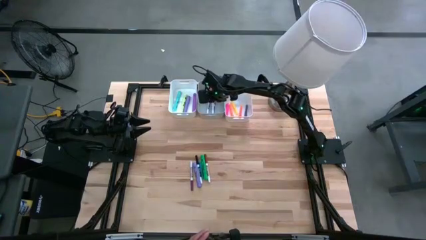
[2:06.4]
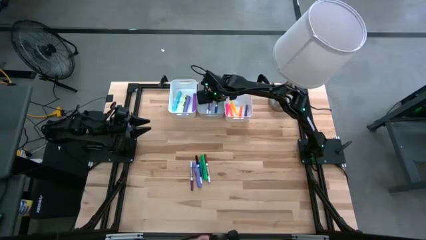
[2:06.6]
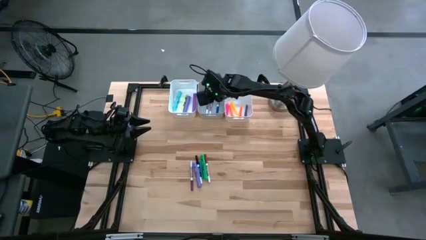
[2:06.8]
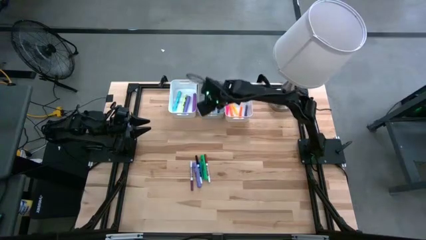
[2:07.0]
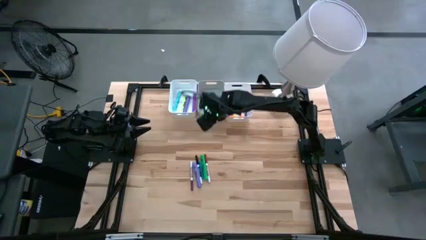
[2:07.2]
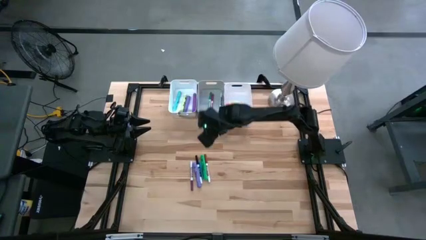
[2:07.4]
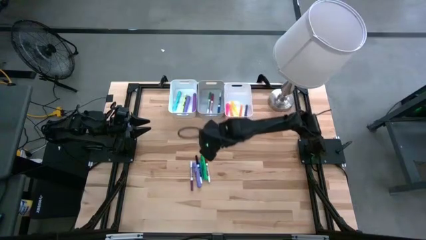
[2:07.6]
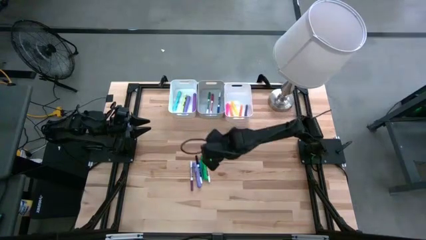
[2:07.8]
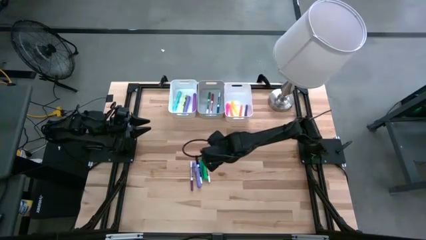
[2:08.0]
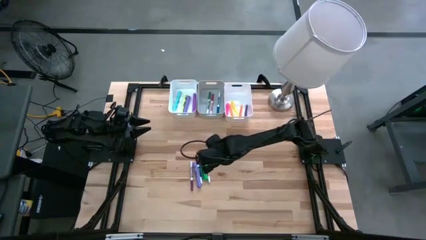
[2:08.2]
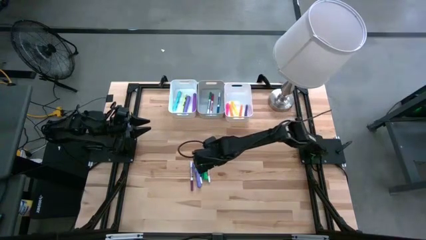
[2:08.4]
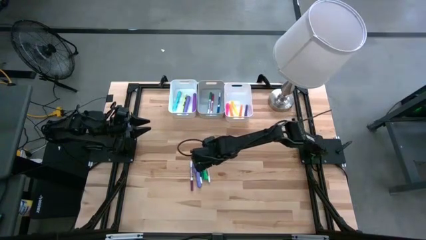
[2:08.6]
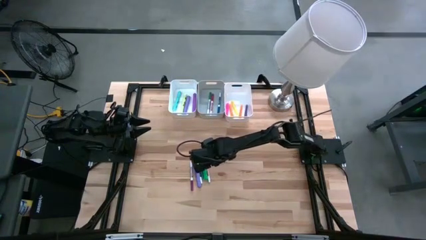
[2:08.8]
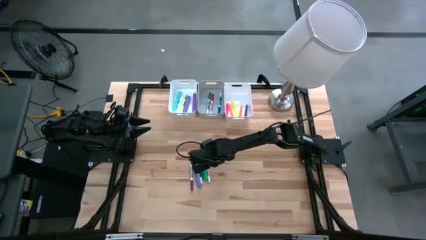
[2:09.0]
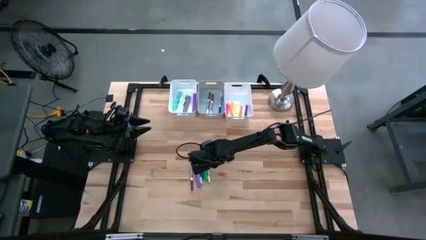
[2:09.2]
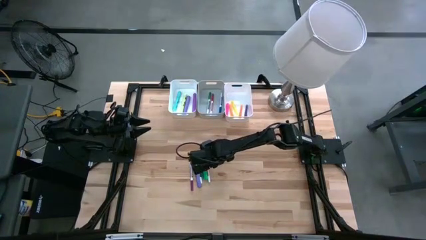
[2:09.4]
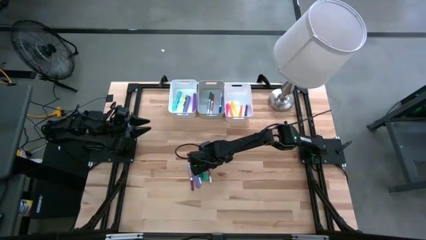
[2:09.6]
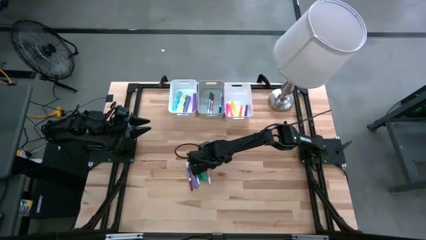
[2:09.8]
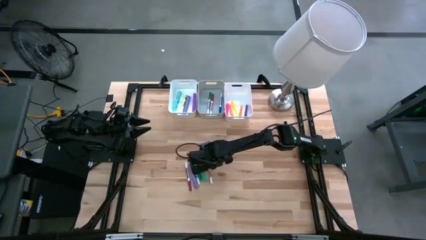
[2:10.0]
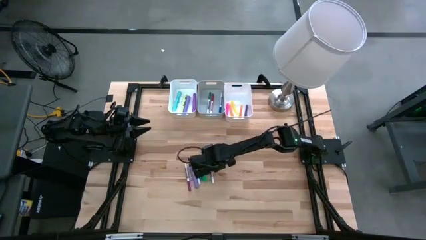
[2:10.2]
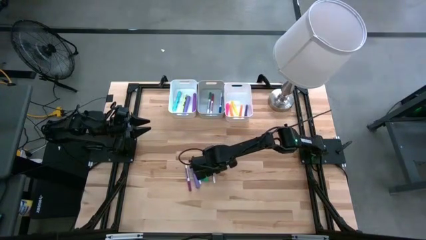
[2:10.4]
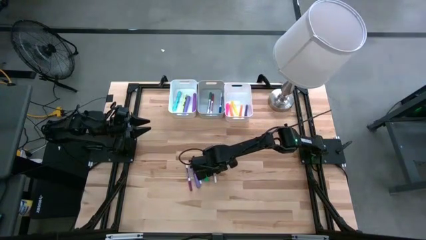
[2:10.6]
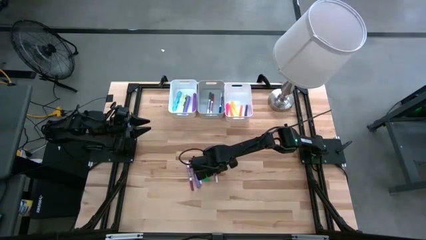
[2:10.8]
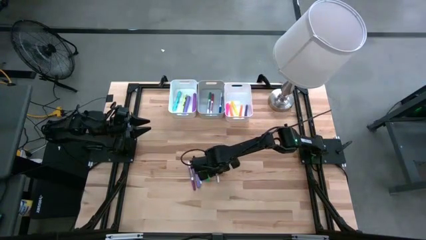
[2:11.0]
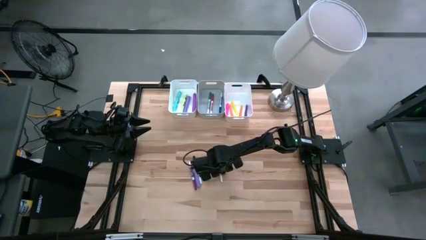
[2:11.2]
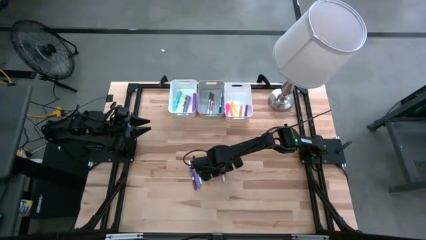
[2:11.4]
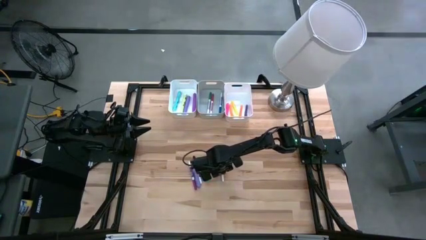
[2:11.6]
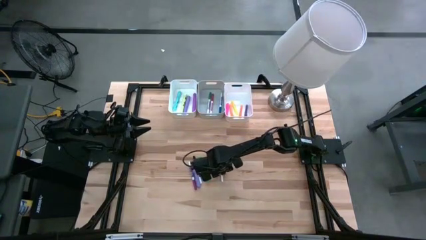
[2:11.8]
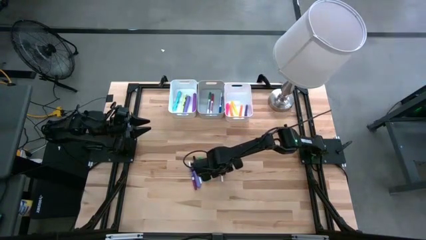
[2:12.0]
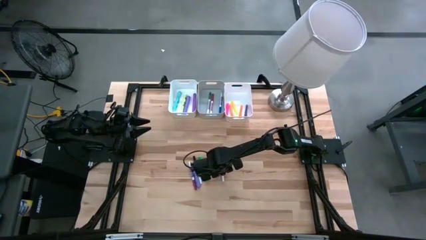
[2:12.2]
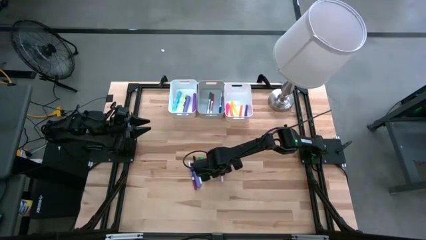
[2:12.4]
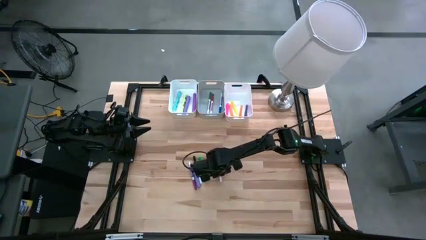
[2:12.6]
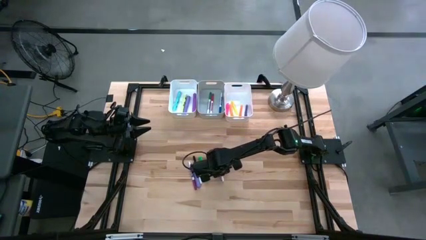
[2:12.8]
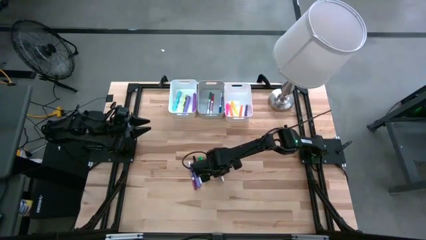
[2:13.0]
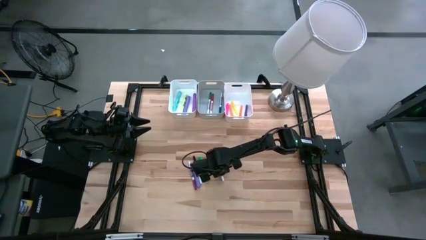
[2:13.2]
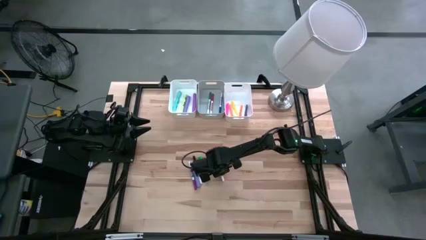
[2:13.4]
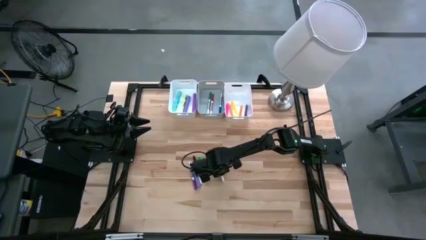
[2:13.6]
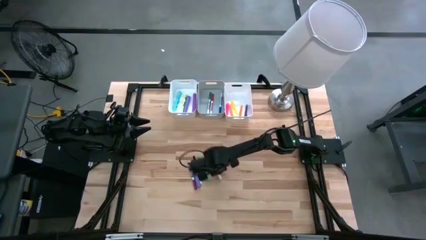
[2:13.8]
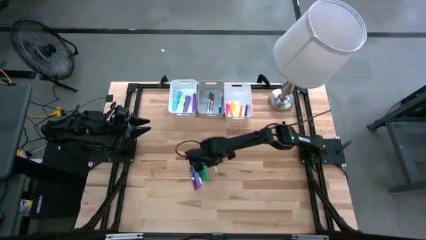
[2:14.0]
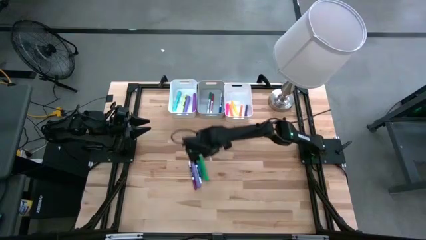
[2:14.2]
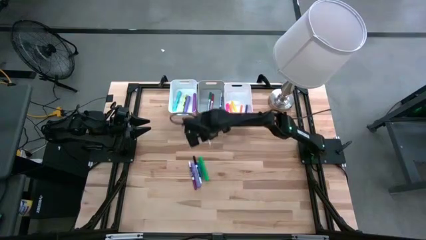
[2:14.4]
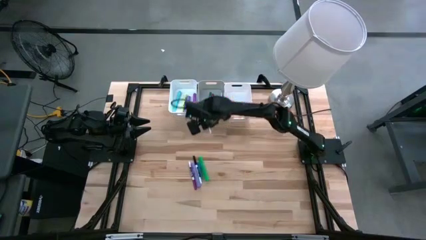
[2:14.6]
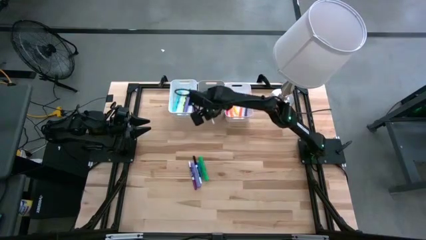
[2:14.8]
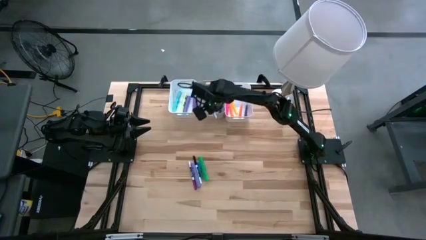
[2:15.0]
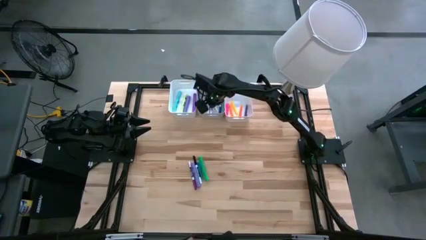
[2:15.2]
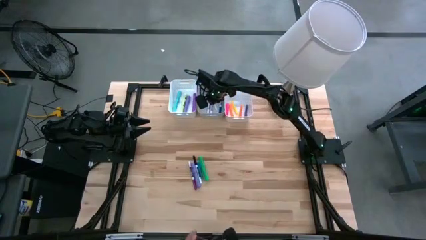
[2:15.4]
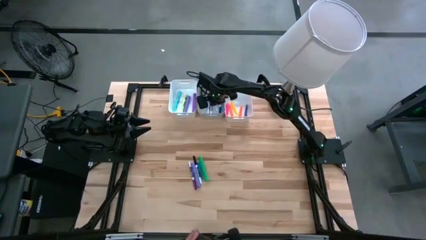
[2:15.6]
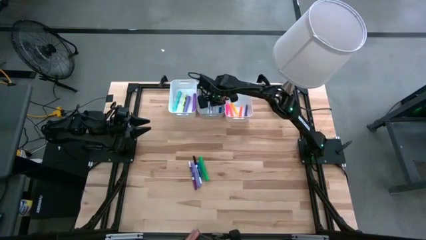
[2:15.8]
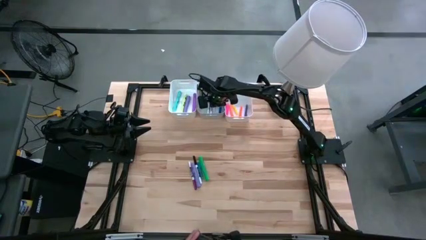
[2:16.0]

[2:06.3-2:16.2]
Task: Pick & Place Markers
Put the brown marker pen into the gray bin

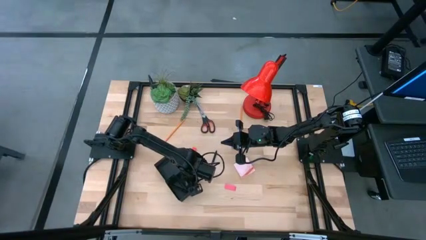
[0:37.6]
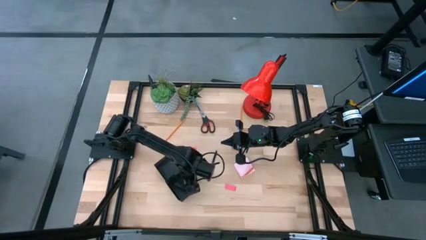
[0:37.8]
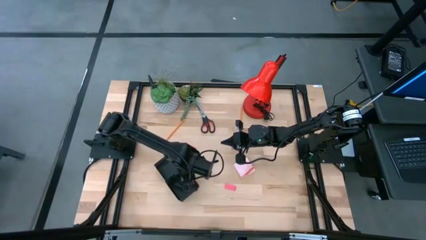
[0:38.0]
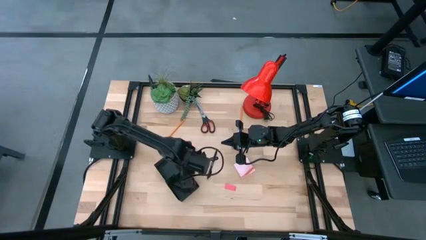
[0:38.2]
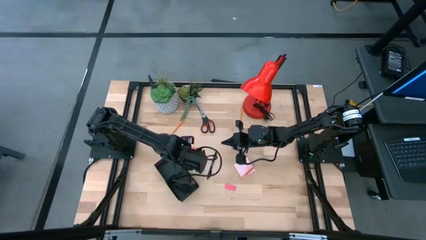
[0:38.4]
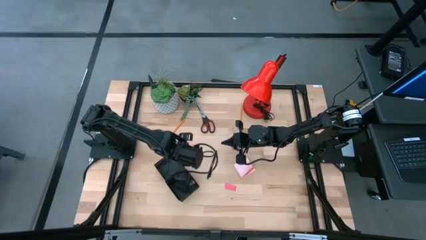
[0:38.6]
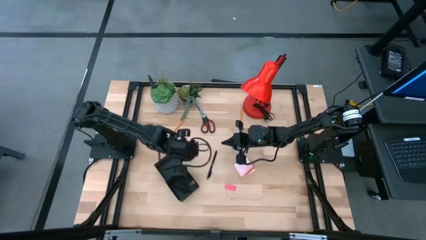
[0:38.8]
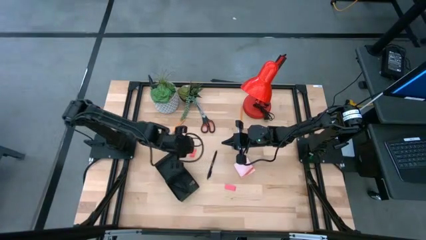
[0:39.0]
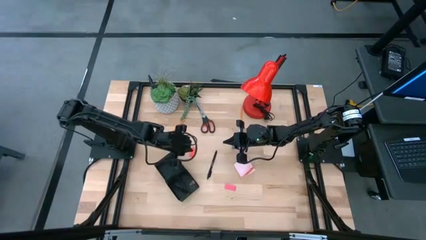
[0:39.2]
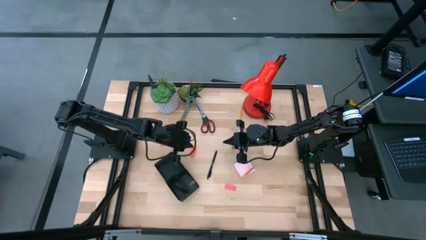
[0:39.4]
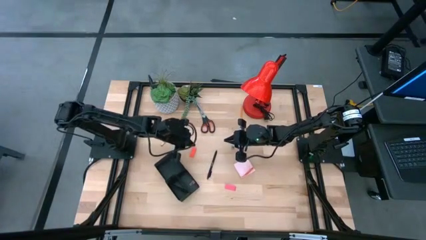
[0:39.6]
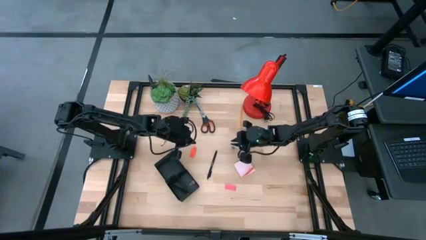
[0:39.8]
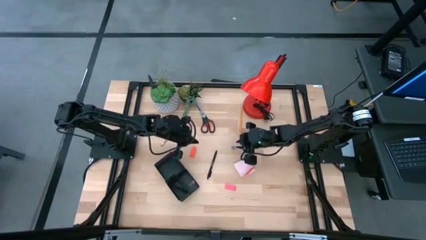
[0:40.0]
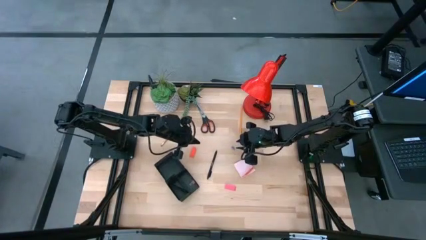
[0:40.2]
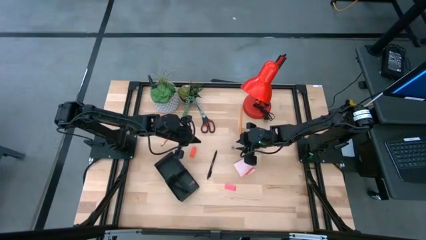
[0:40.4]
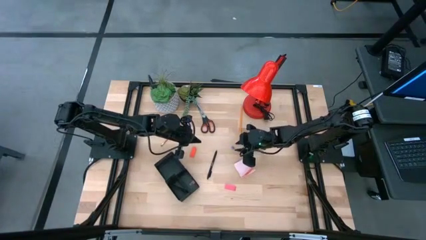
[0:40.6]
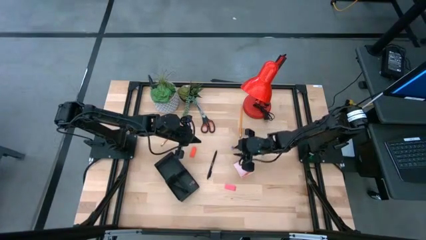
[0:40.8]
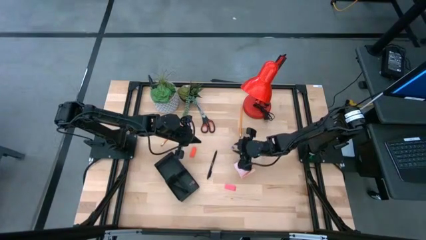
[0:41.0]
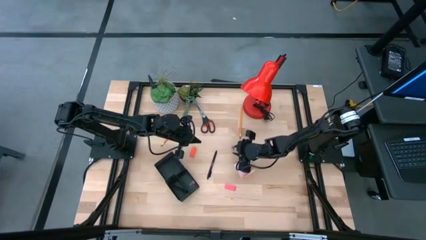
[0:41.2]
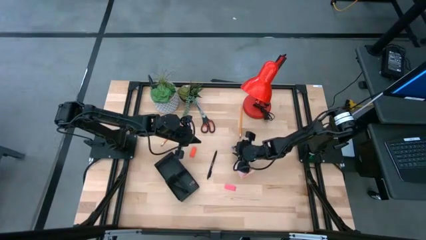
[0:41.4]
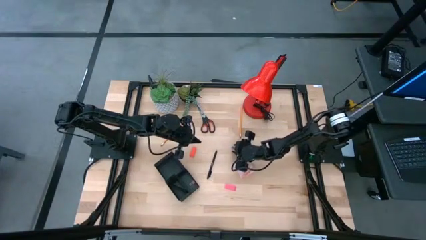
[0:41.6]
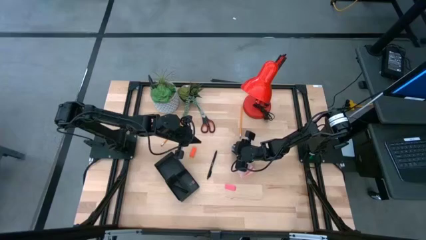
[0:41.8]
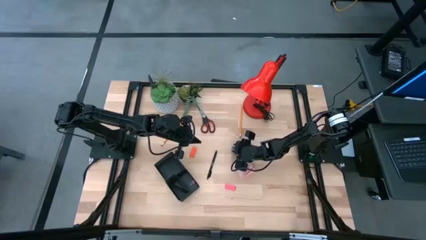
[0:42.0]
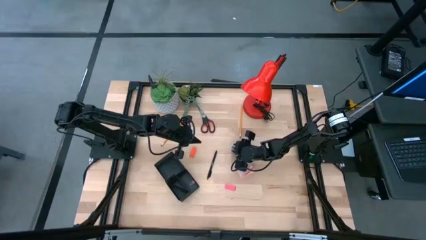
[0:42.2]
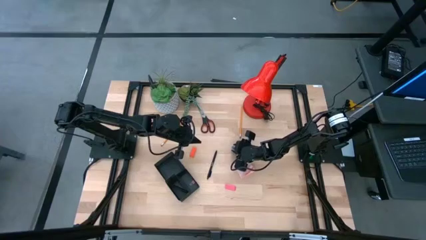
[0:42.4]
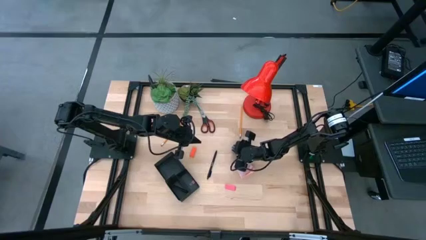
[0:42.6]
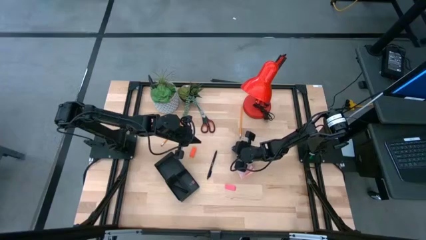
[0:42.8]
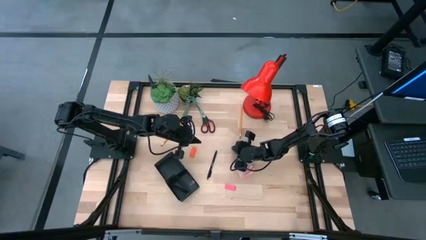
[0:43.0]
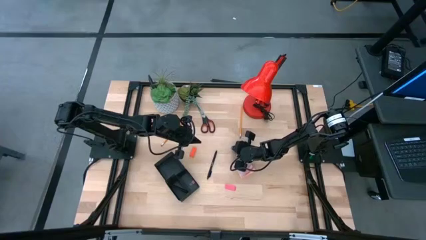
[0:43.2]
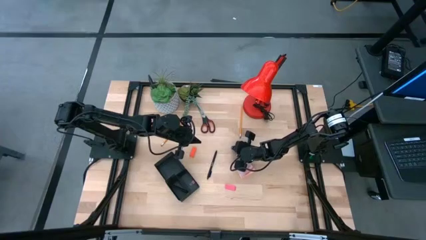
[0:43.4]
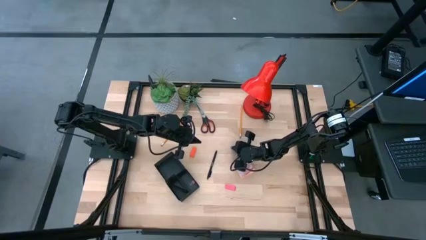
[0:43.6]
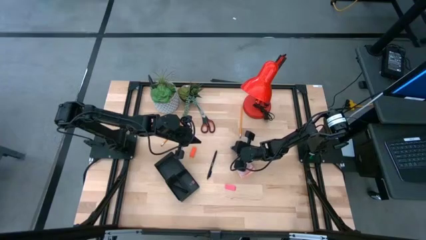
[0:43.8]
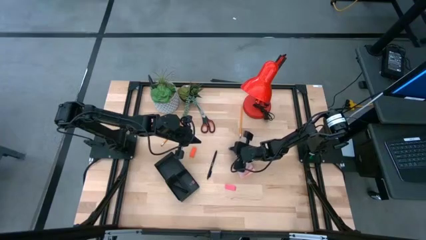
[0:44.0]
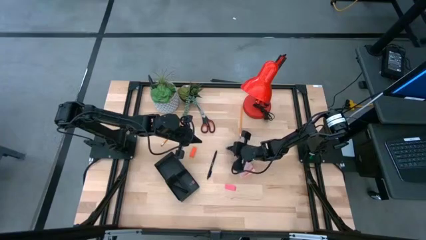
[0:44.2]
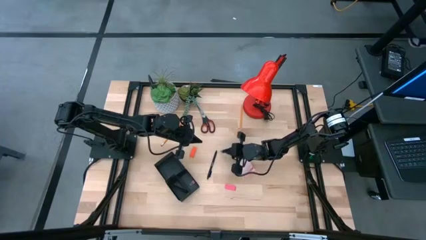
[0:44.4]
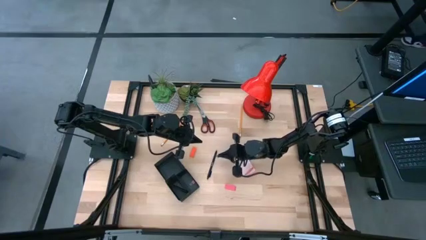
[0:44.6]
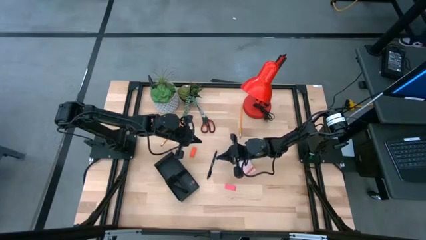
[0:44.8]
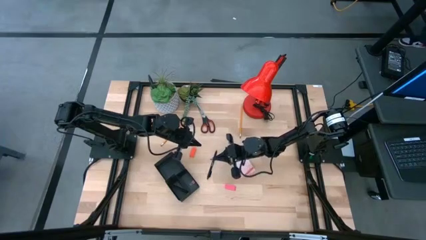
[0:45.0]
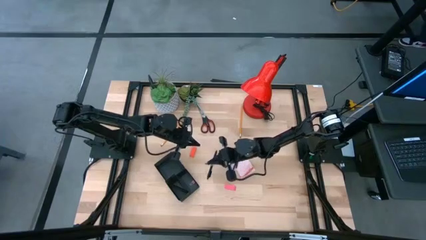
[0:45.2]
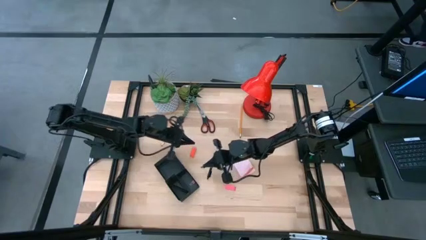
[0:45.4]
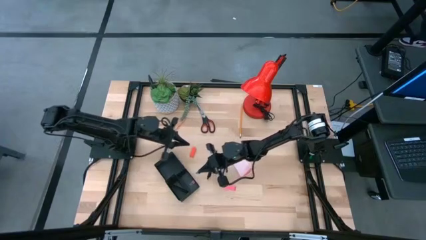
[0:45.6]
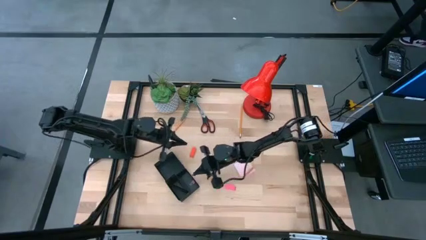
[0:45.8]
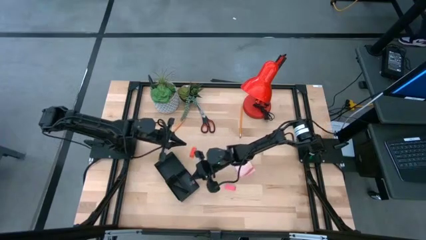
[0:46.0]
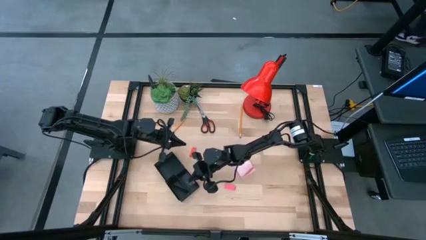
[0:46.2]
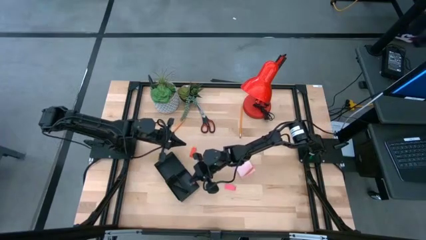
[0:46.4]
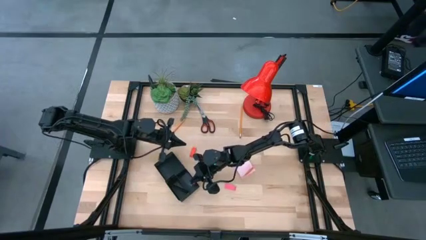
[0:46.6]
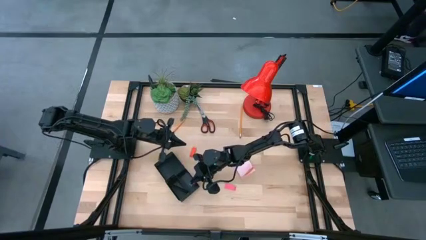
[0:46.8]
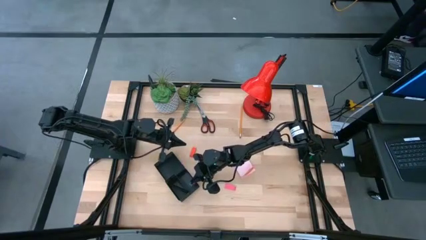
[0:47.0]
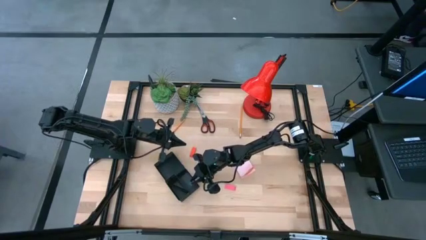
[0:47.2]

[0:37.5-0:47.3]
Task: Pick and place office supplies into organizer
Put the blue binder clip into the black desk organizer
